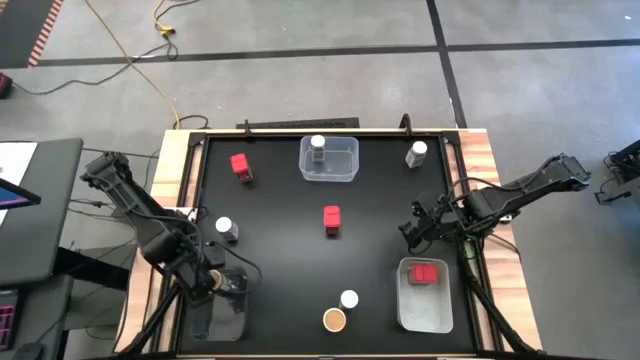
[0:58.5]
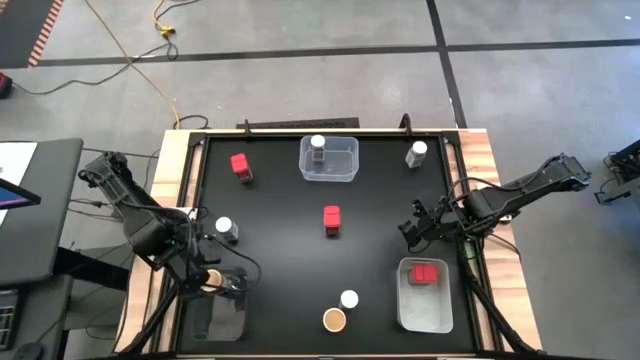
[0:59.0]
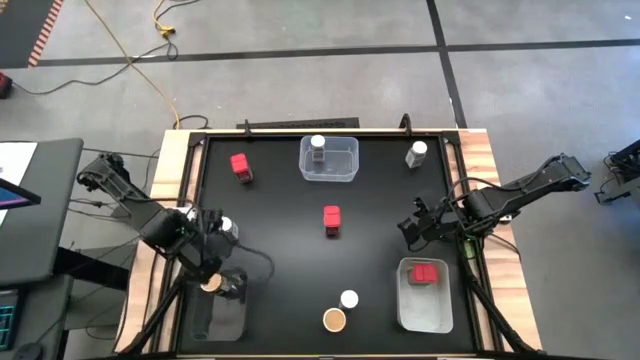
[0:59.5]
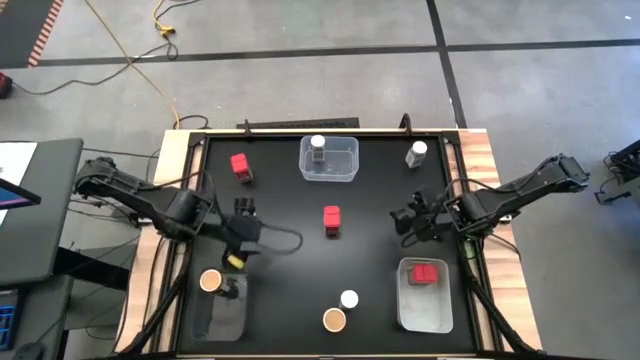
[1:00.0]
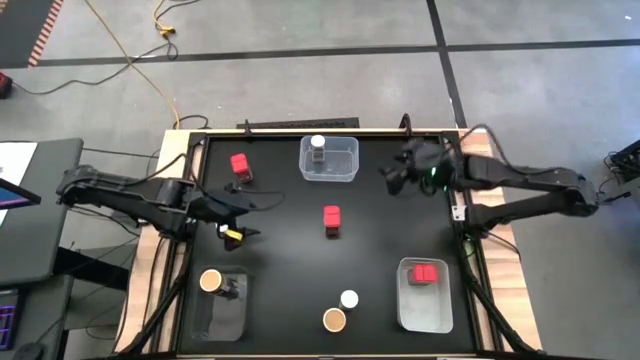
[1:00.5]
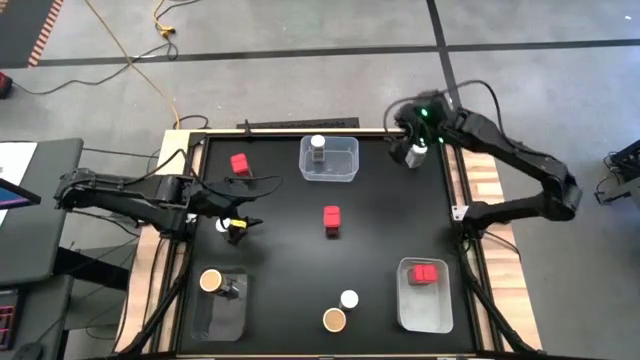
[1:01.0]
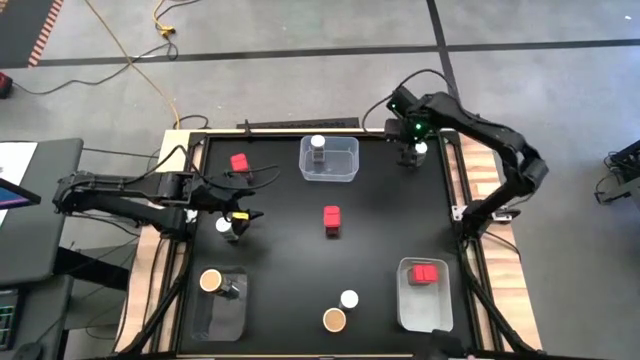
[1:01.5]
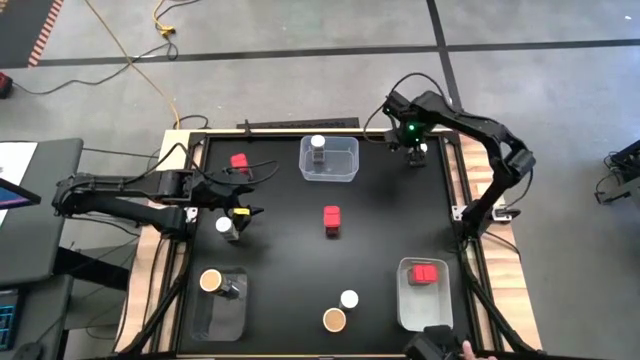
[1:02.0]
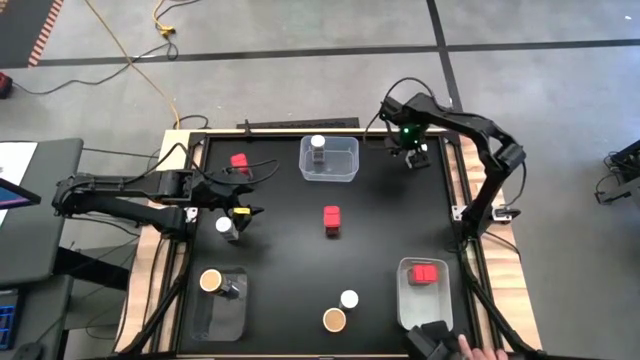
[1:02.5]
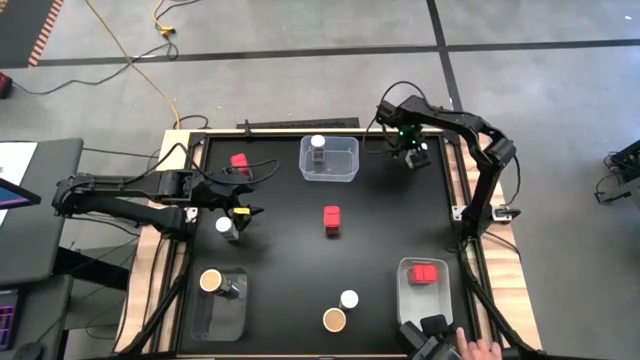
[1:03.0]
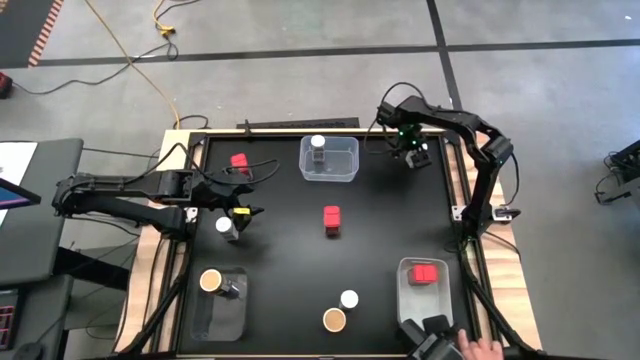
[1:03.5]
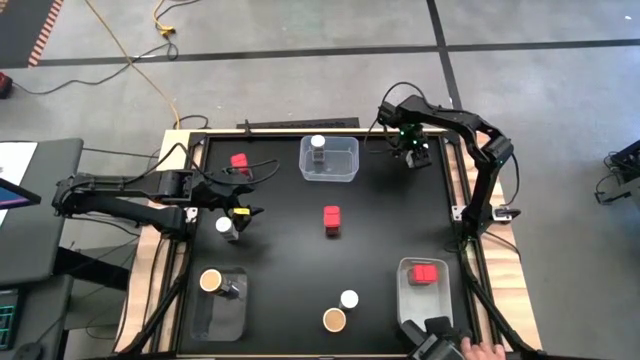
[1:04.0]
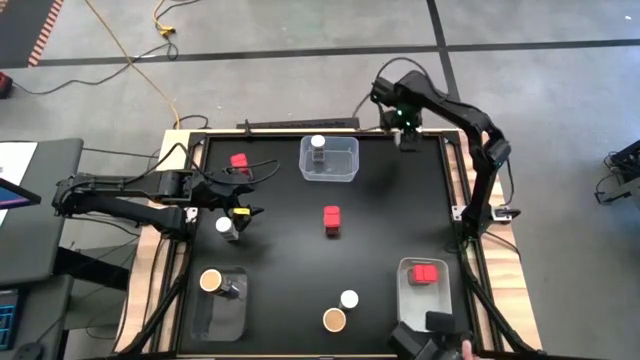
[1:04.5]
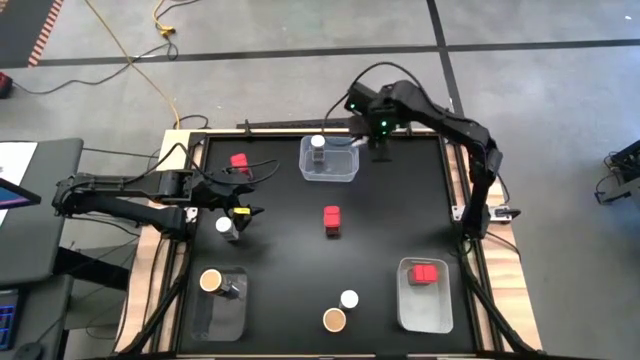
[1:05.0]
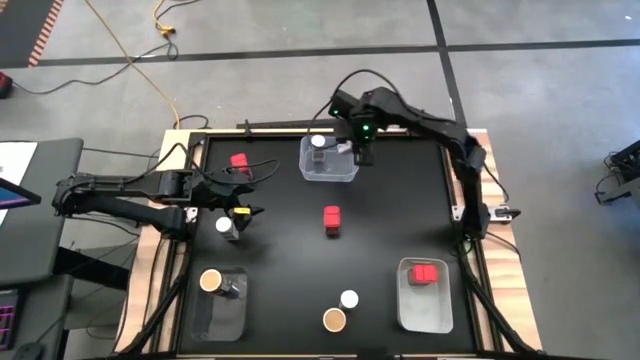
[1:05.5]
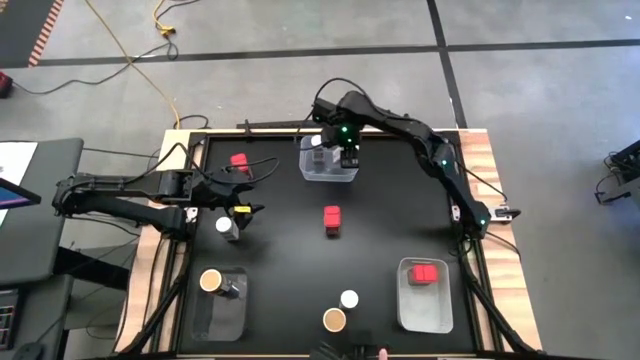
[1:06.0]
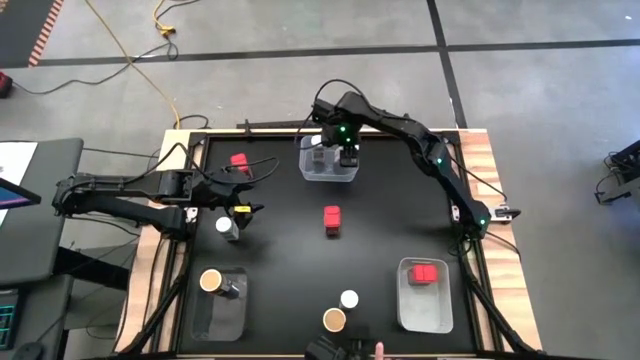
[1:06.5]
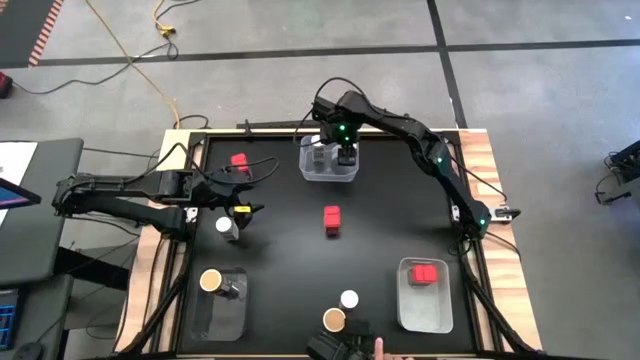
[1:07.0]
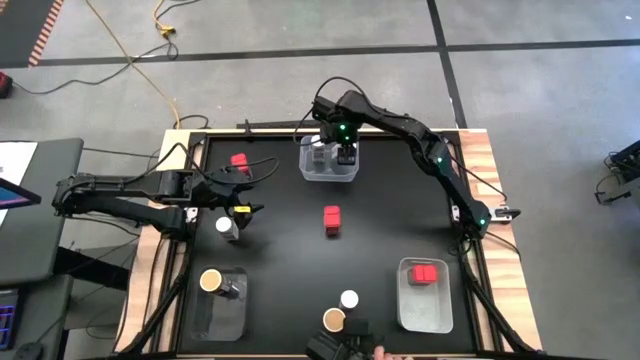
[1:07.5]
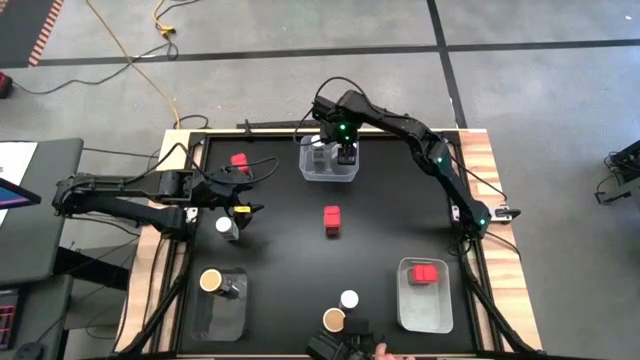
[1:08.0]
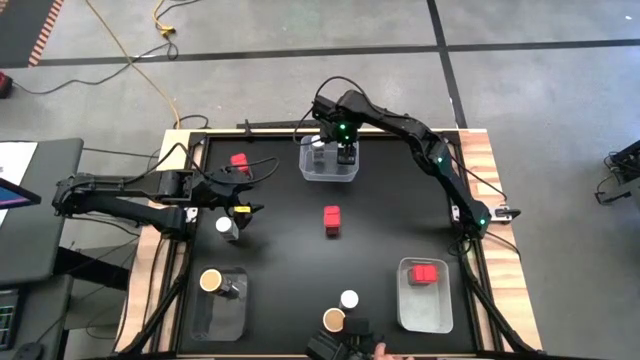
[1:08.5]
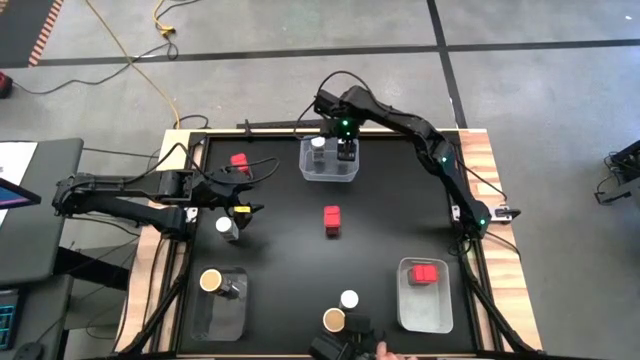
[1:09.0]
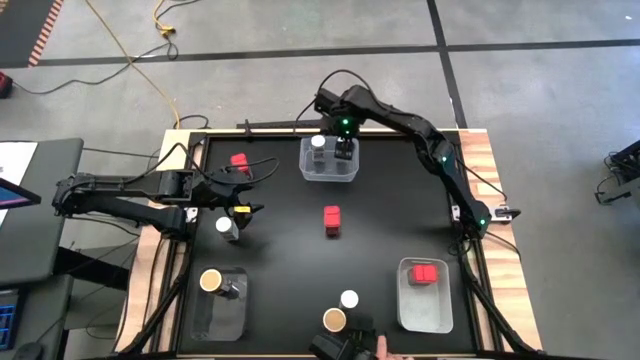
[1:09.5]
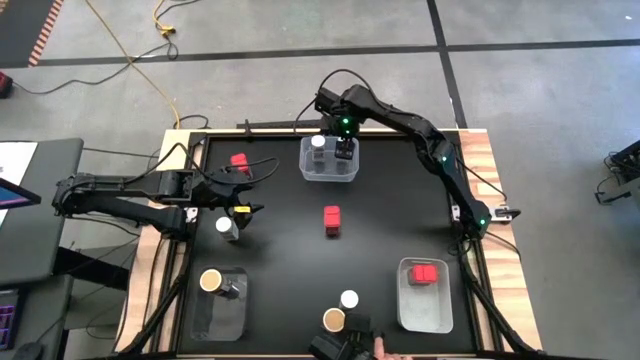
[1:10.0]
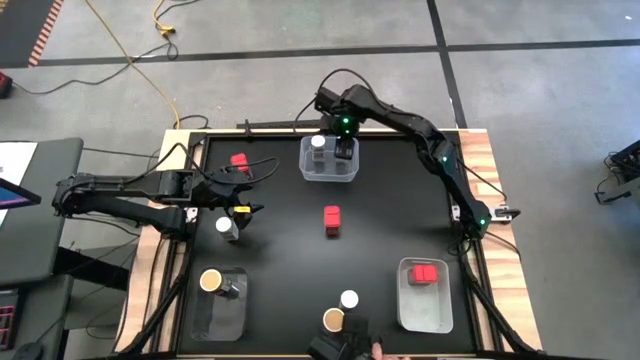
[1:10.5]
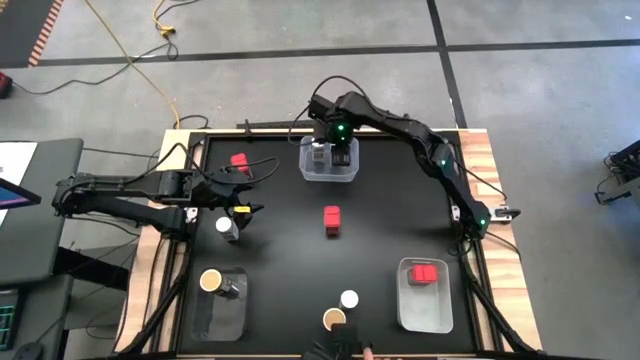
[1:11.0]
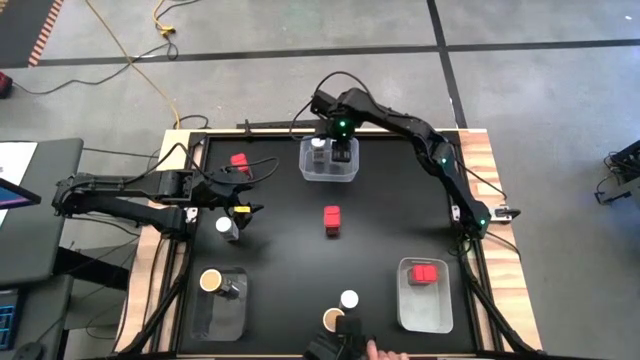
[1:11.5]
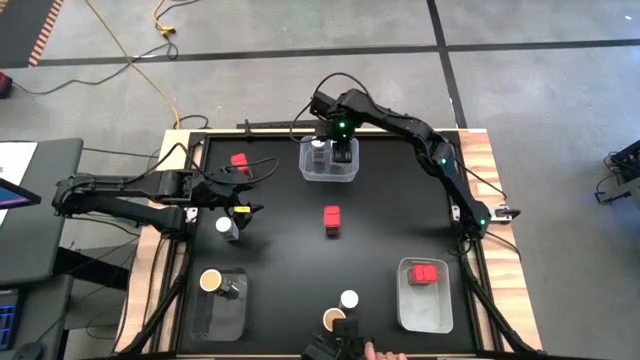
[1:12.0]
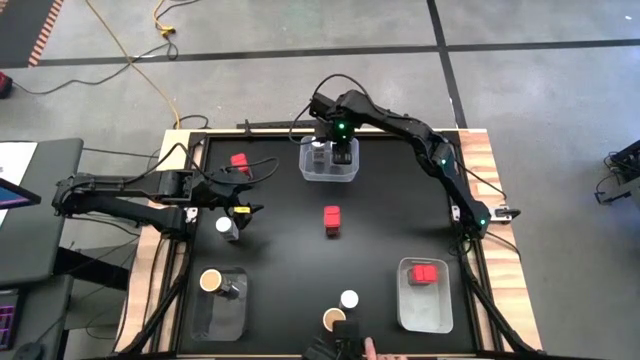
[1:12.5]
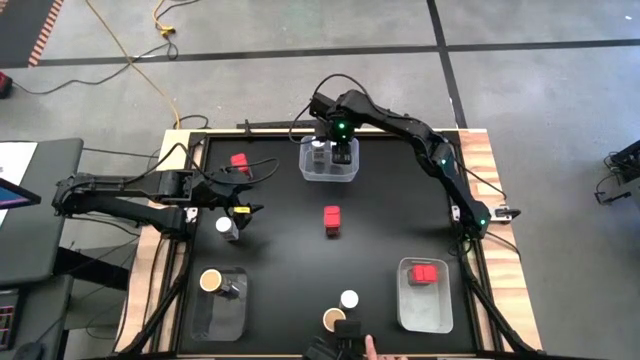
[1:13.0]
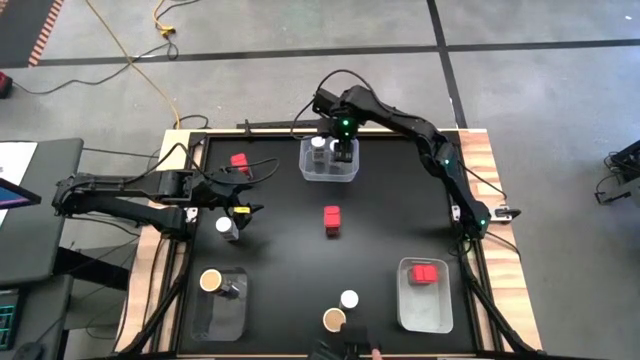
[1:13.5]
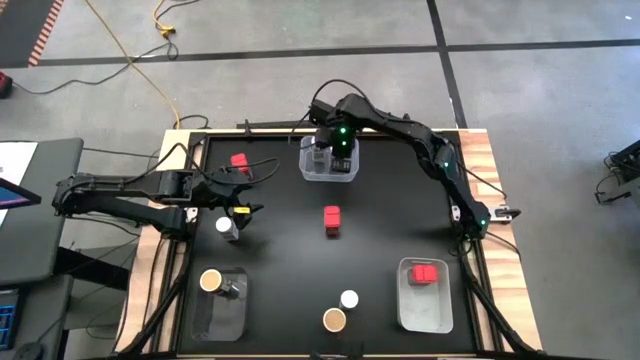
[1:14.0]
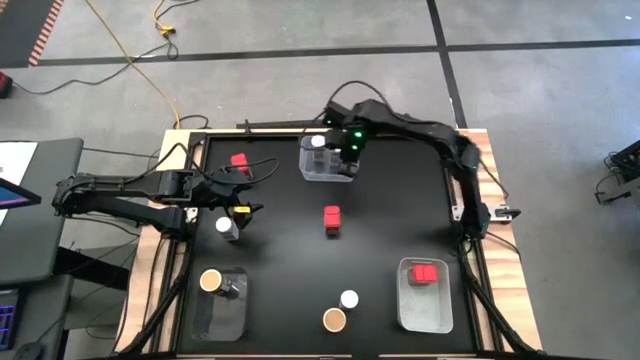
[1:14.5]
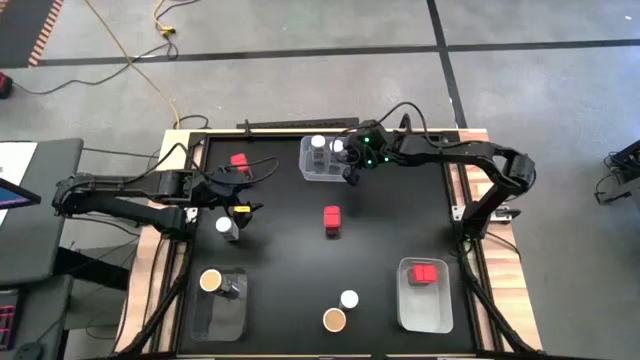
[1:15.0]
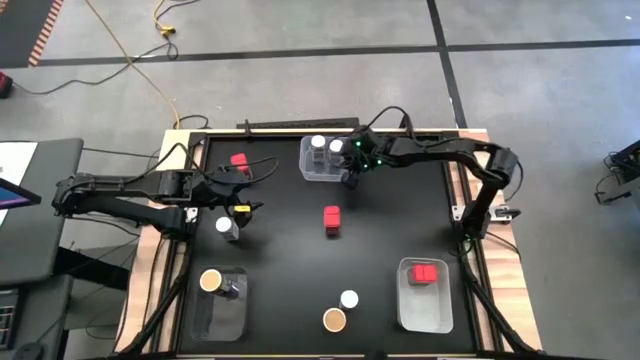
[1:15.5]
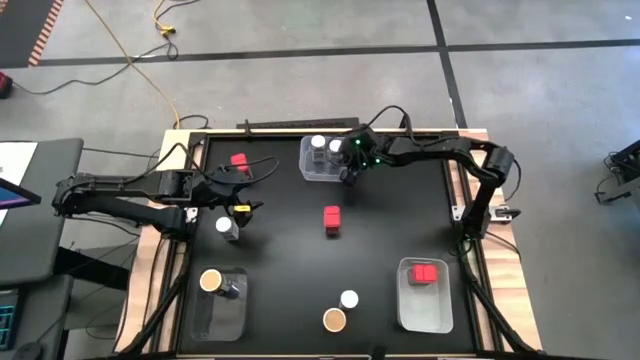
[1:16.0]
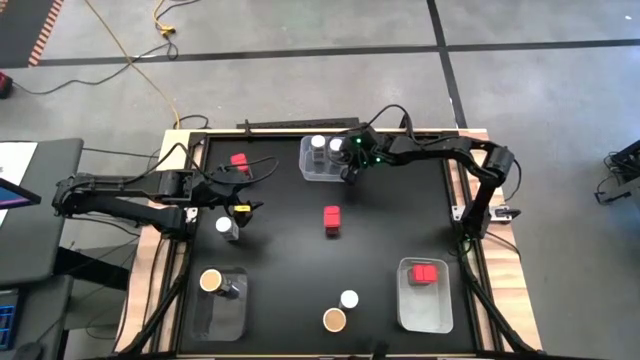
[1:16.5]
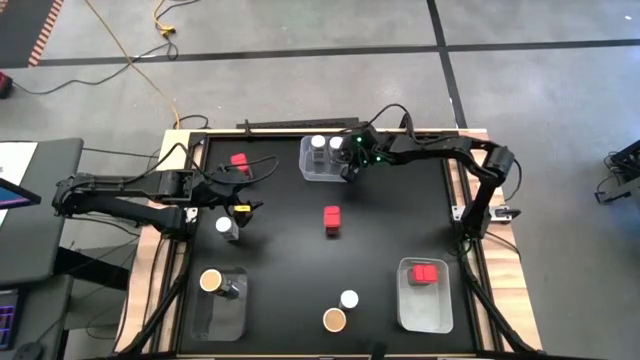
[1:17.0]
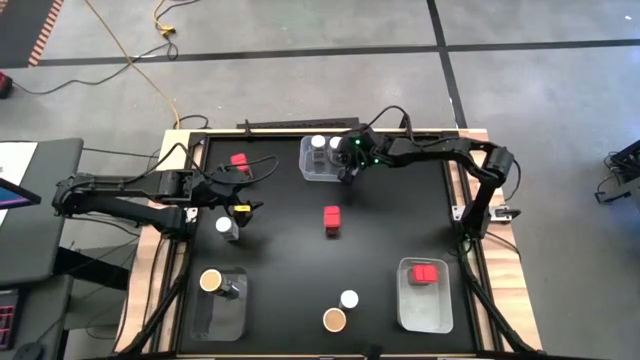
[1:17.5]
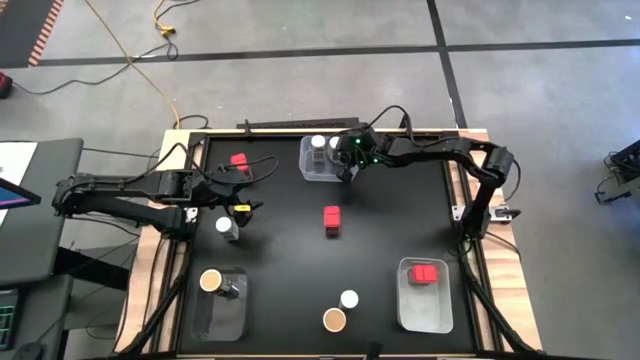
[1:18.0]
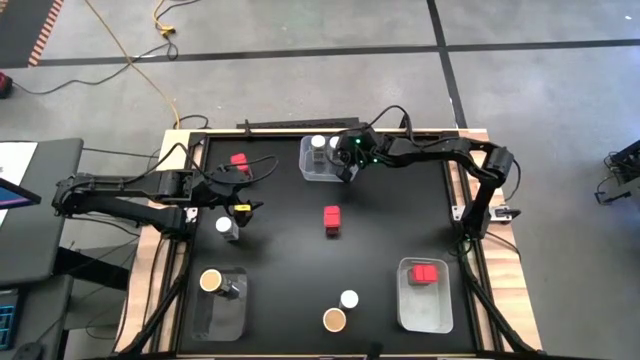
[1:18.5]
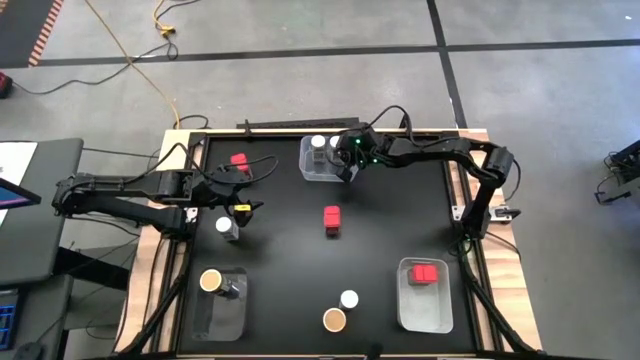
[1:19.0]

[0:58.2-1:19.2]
Task: Sort spices by type
Put the top right white spice bottle into the transparent bin
